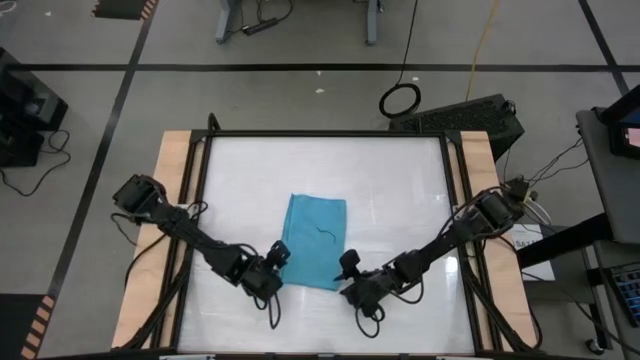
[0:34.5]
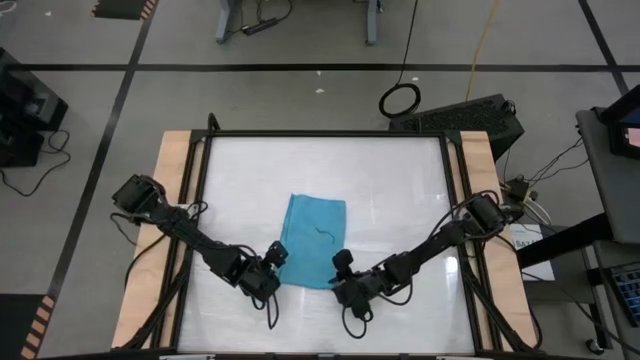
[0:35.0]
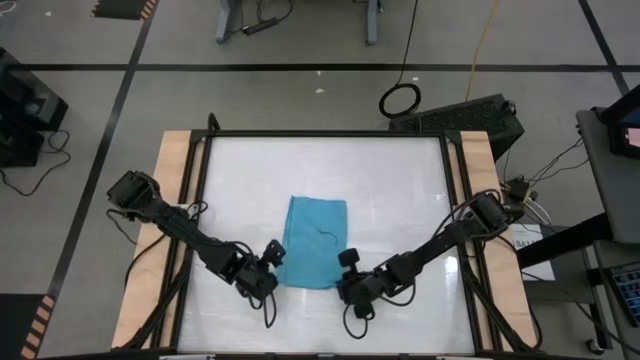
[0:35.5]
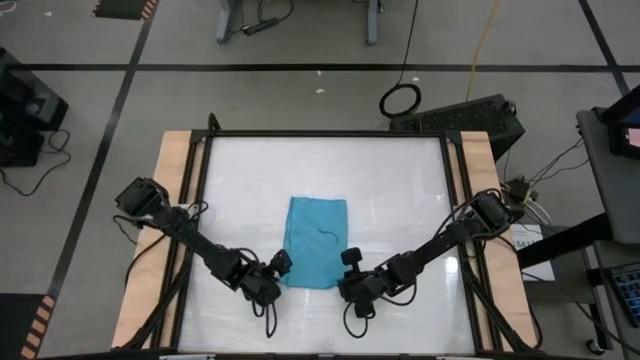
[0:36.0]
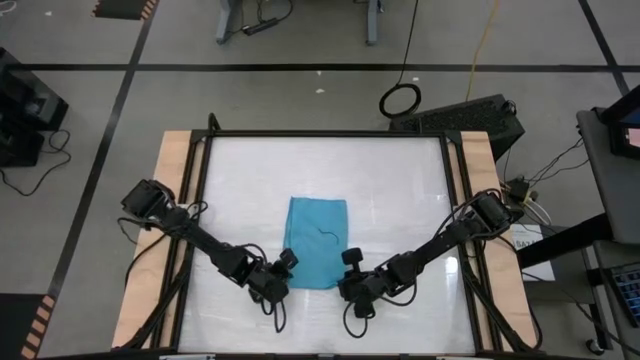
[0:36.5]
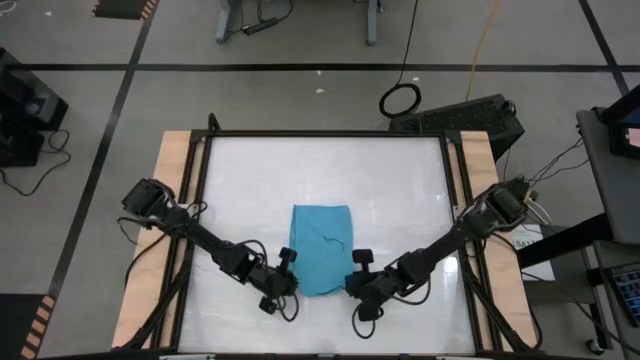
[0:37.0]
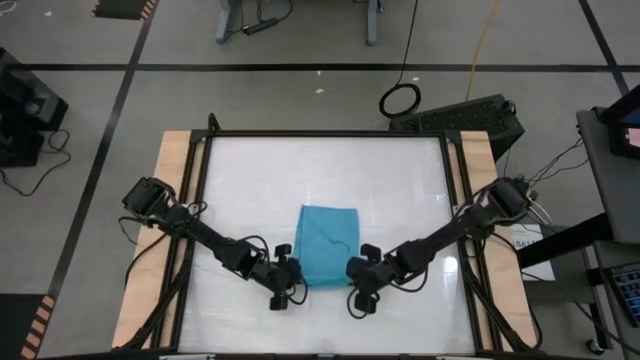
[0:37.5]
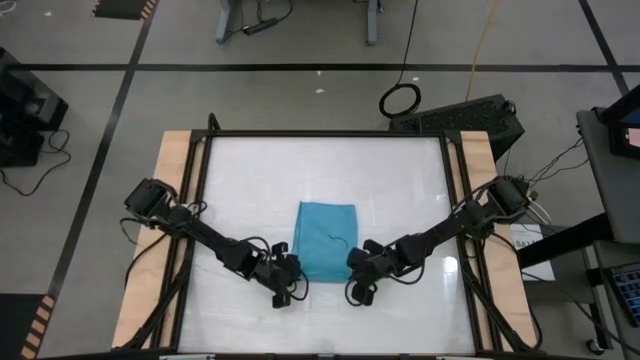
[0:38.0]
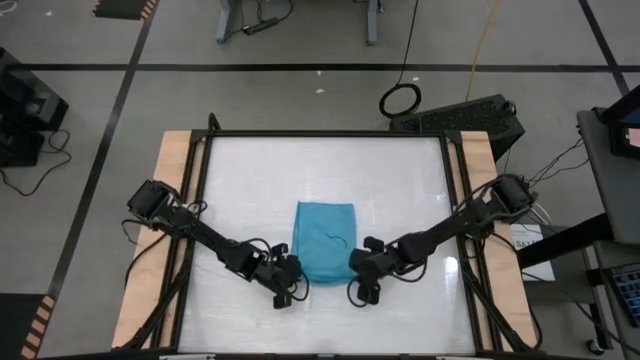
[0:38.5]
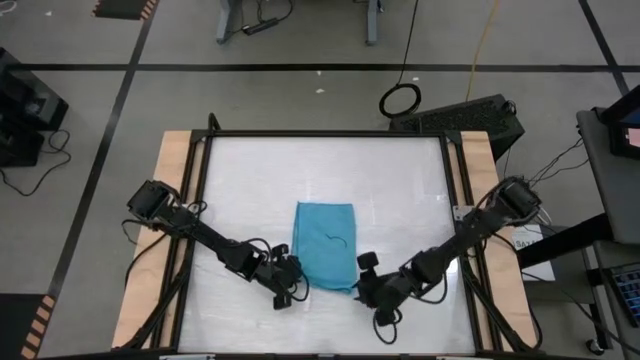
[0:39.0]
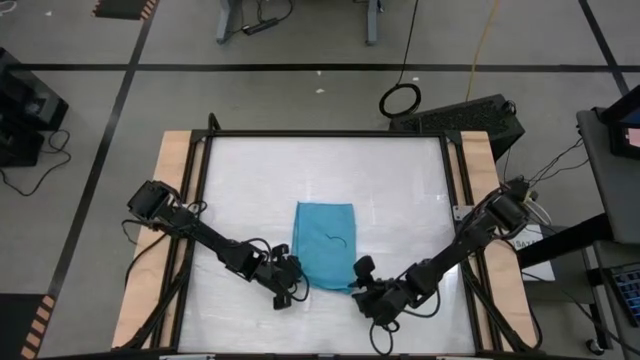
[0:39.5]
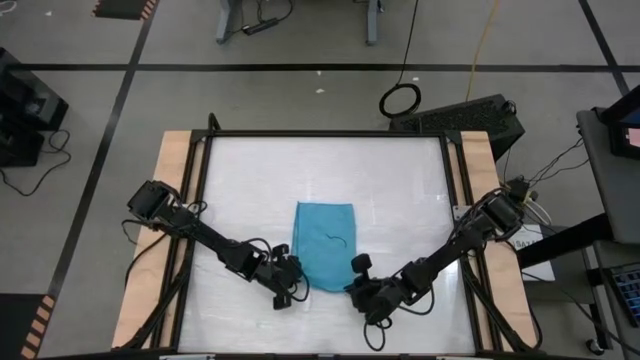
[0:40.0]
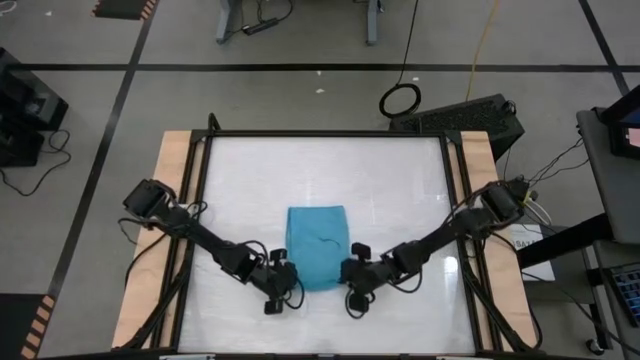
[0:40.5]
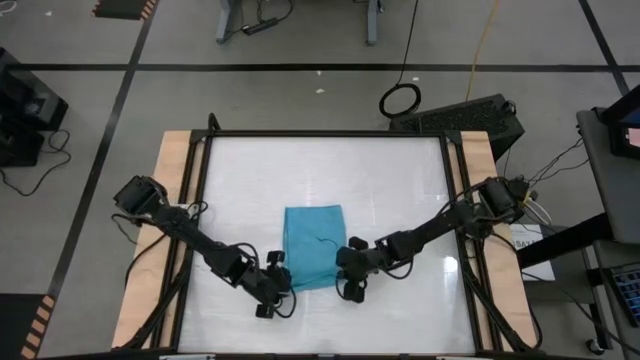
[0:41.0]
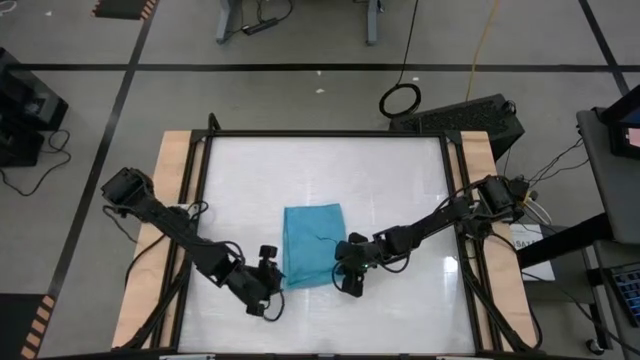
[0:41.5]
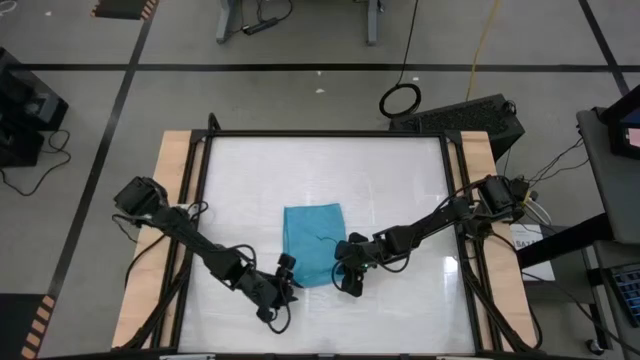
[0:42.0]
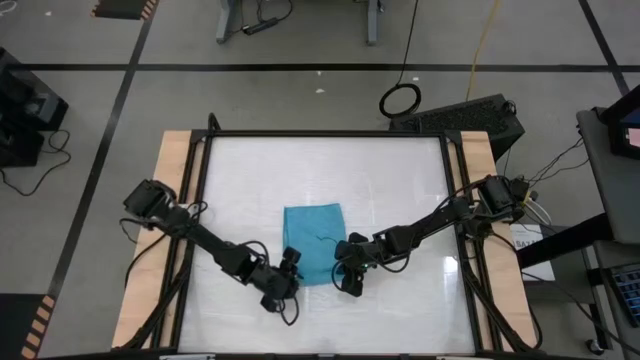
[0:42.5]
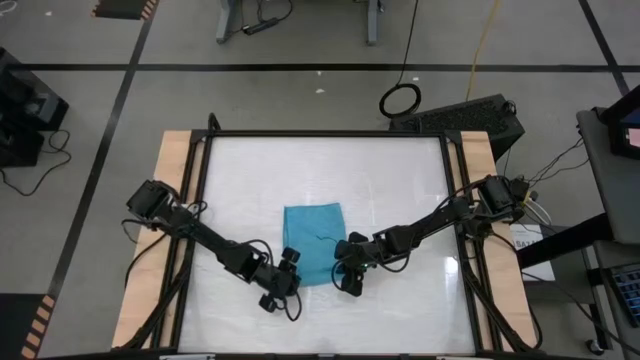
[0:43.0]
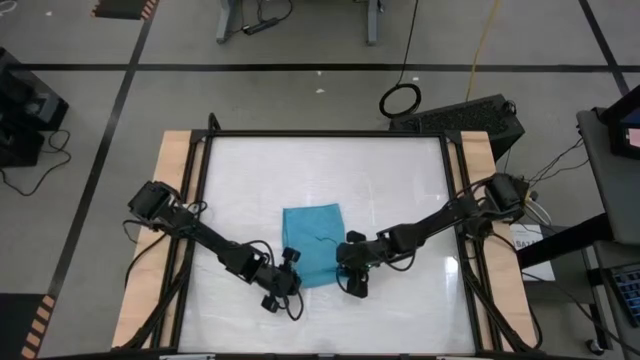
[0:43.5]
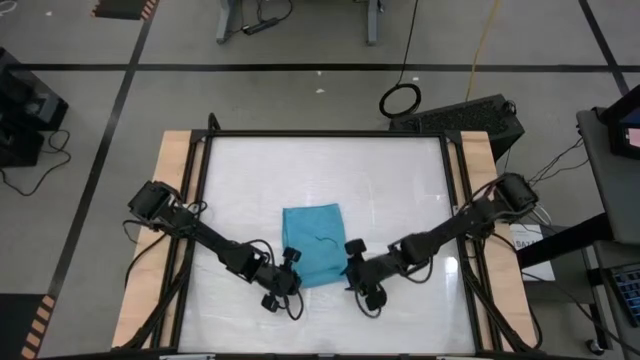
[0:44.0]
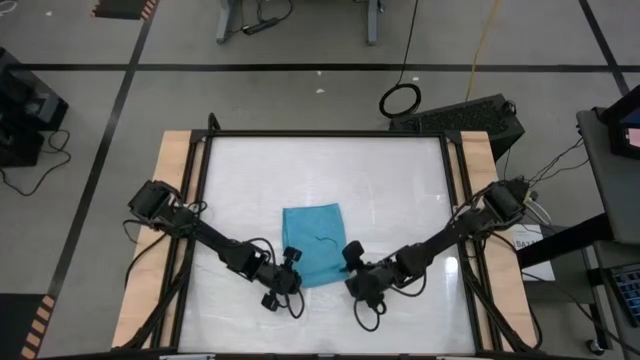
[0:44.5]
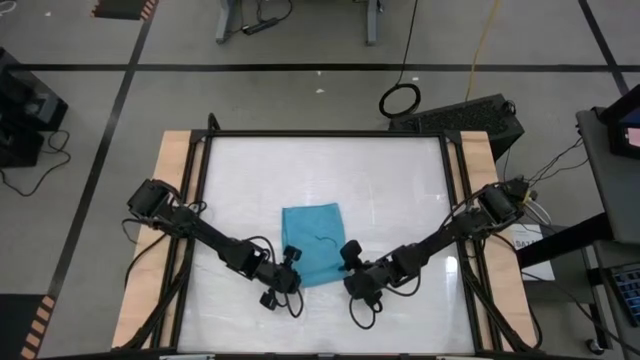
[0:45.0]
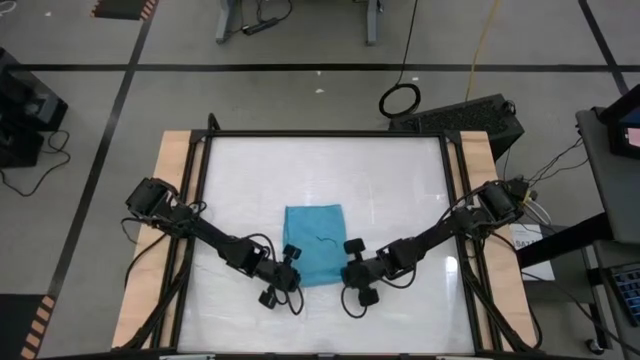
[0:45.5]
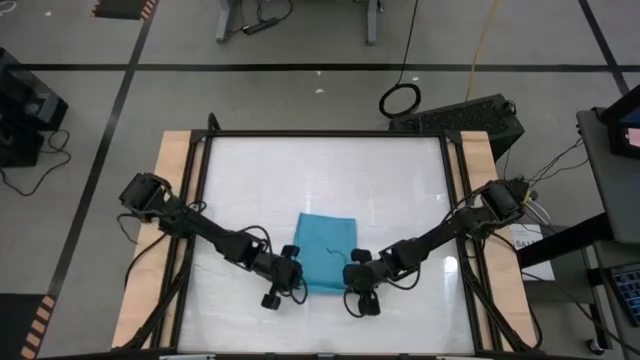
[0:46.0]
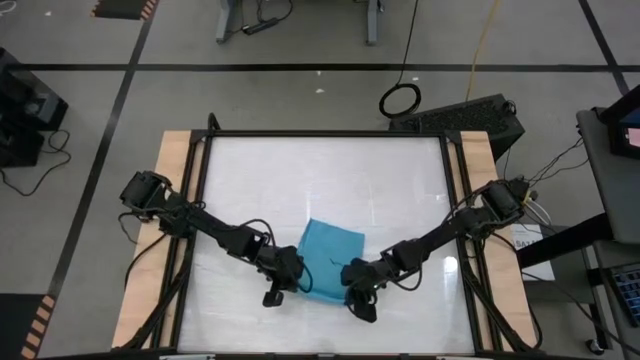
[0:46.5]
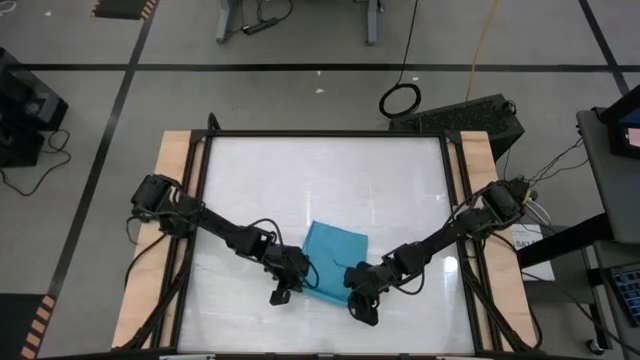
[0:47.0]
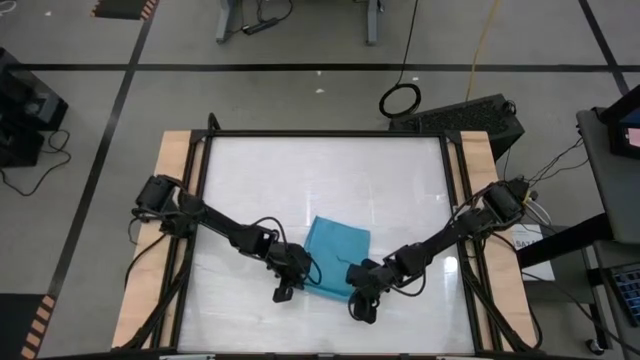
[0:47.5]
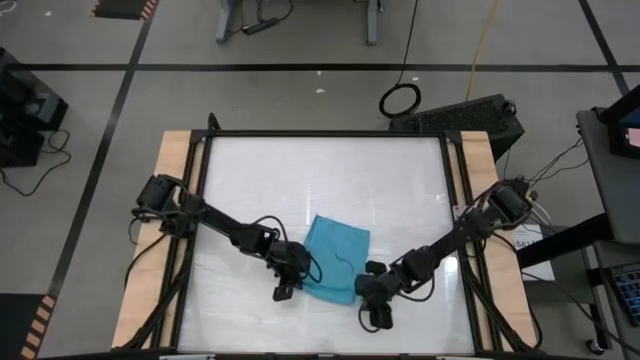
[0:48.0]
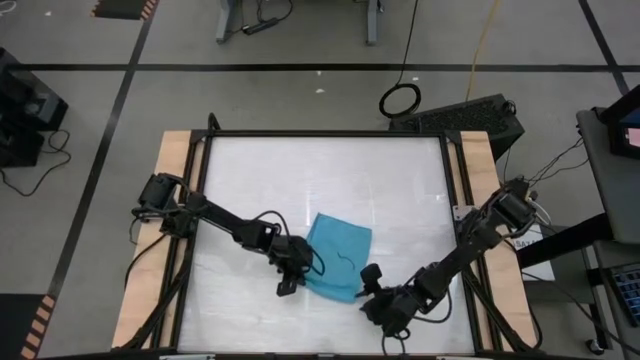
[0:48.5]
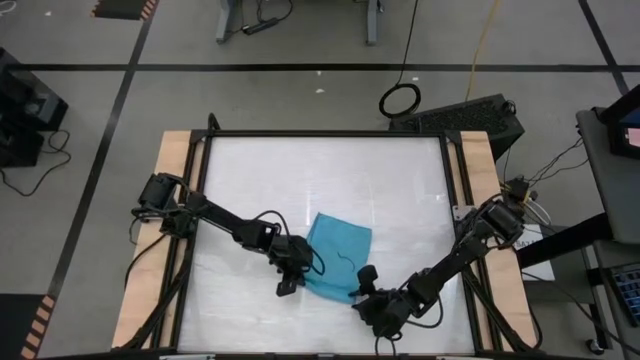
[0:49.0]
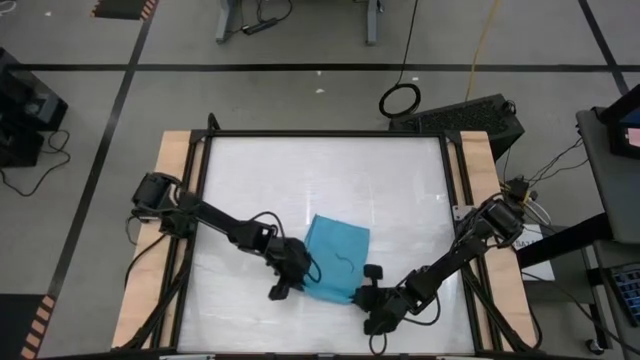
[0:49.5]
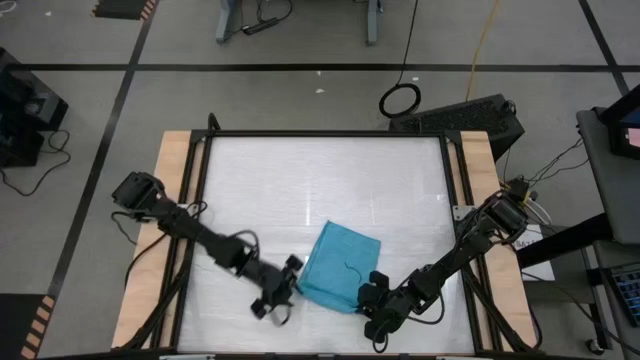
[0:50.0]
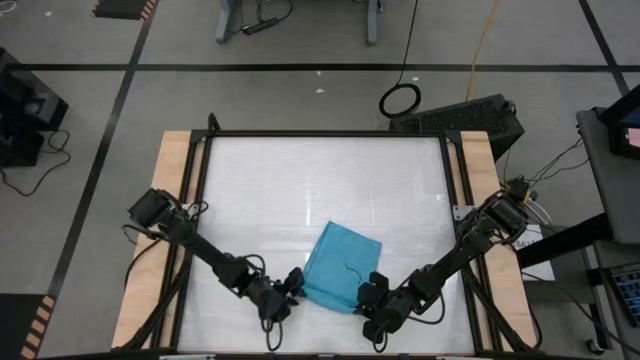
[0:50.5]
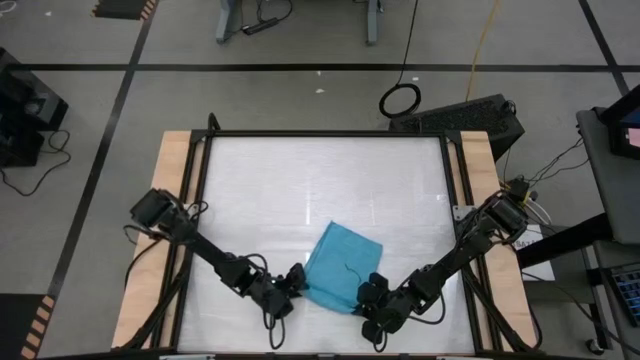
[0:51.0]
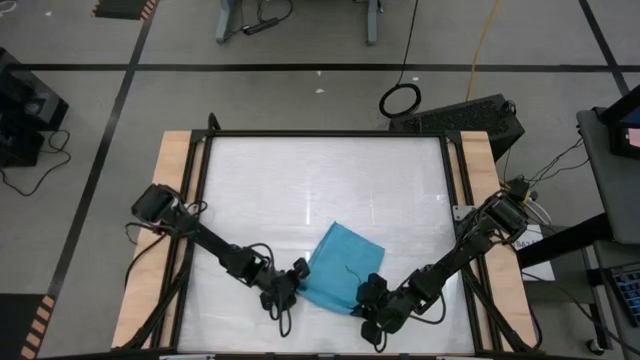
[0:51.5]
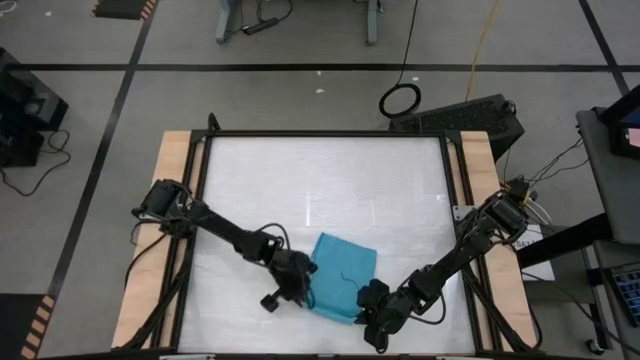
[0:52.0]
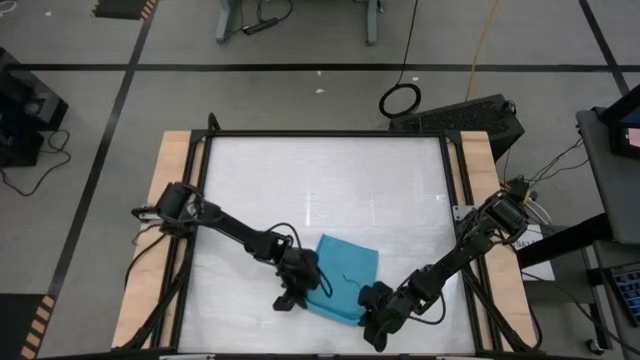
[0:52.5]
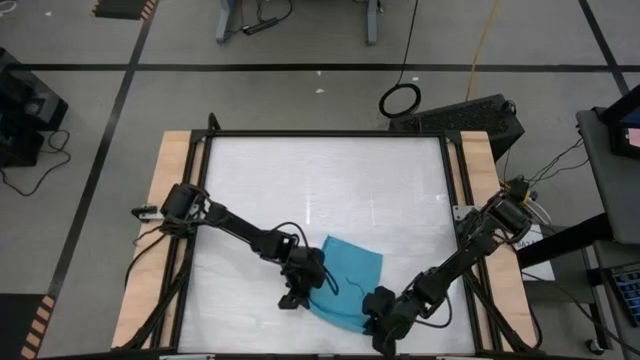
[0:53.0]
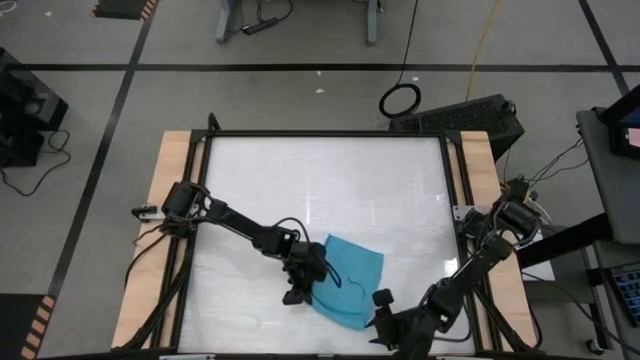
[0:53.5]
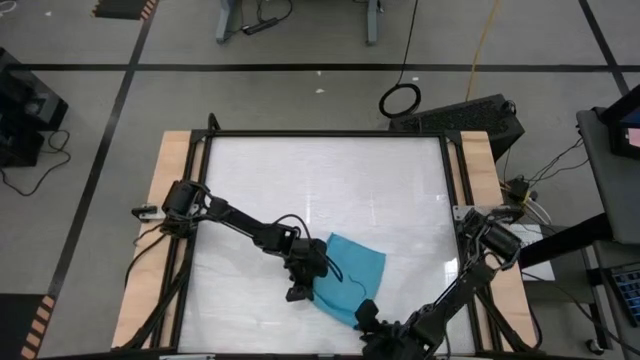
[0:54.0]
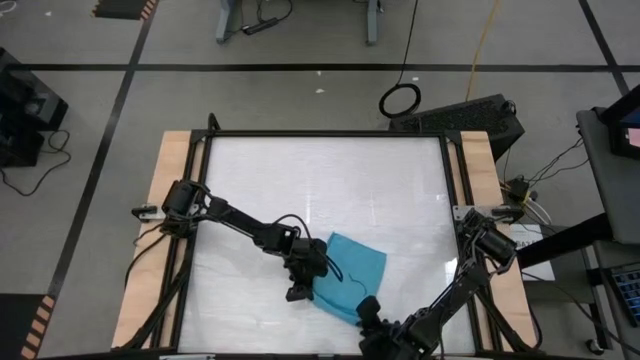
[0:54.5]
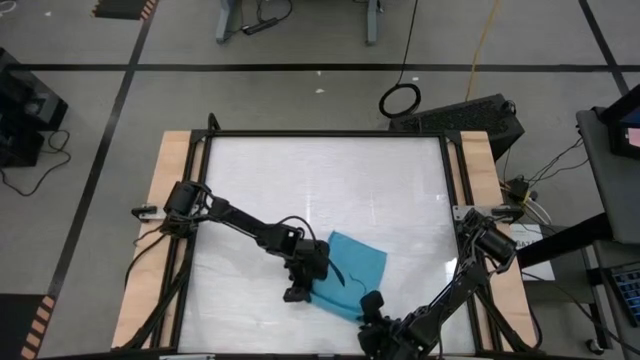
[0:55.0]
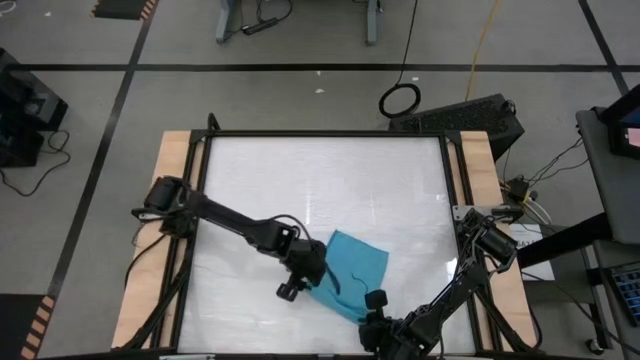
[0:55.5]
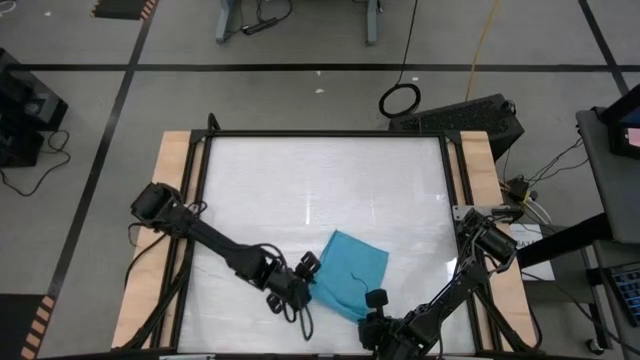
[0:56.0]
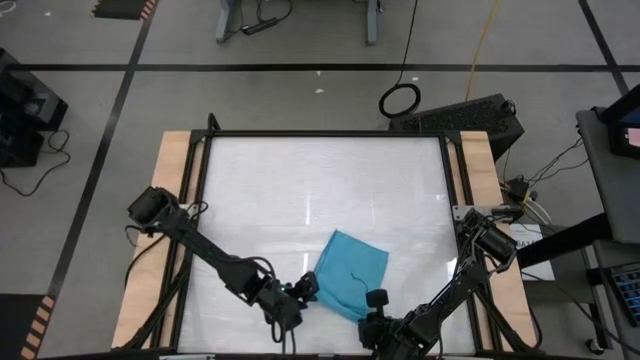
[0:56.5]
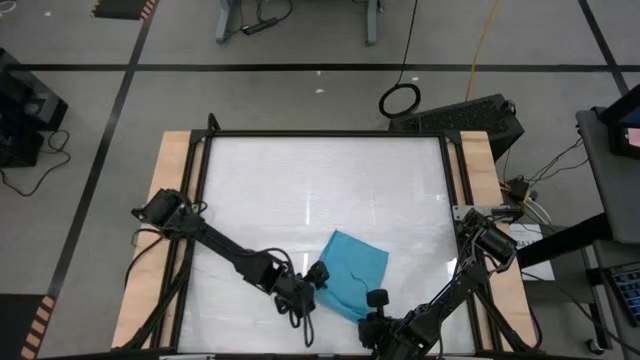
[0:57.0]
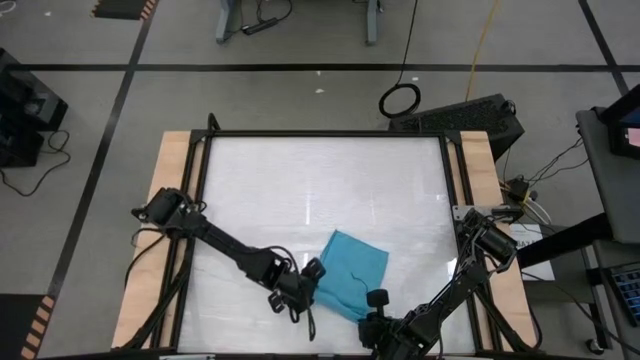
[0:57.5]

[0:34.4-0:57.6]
Task: Roll towel
Roll the blue towel
